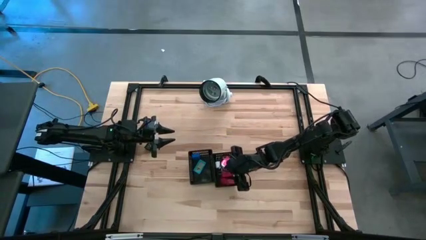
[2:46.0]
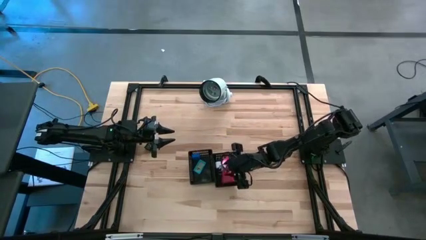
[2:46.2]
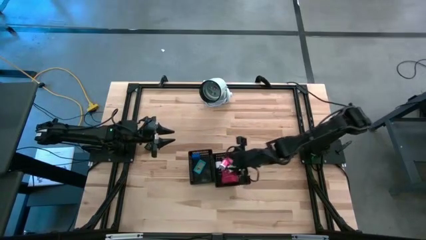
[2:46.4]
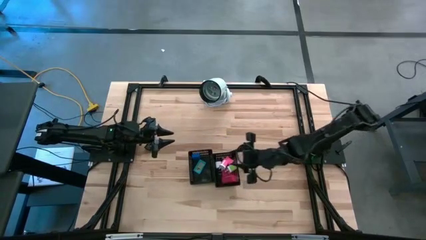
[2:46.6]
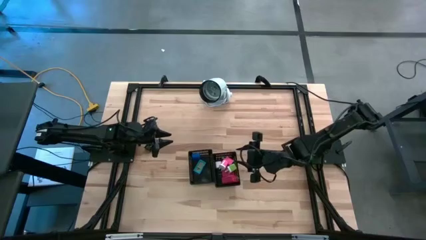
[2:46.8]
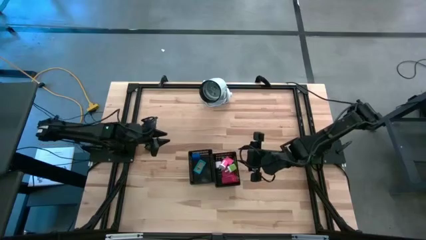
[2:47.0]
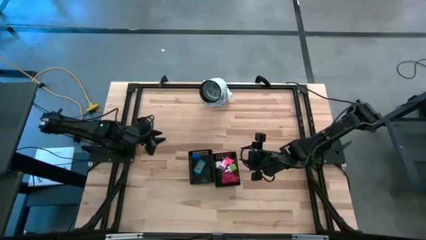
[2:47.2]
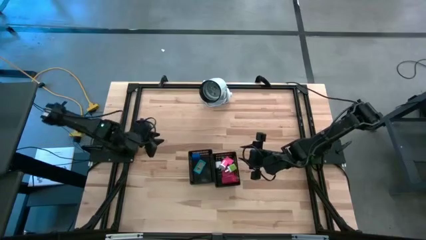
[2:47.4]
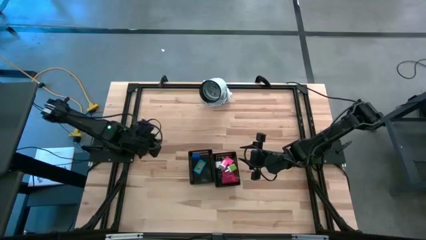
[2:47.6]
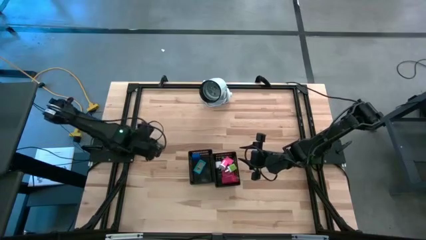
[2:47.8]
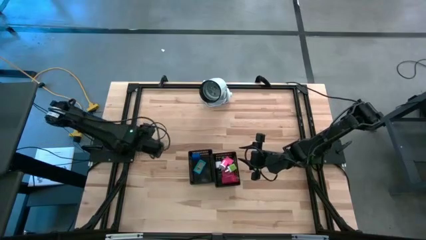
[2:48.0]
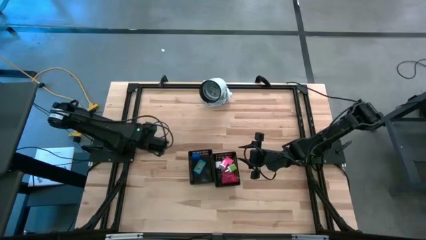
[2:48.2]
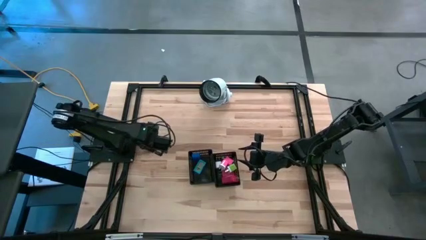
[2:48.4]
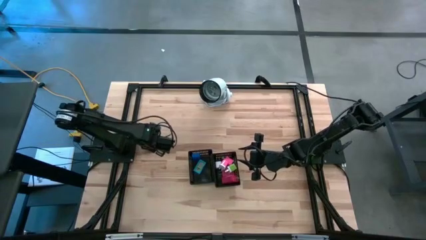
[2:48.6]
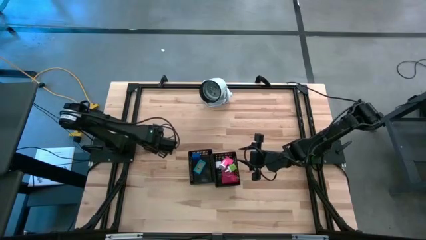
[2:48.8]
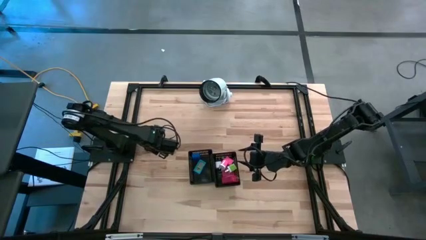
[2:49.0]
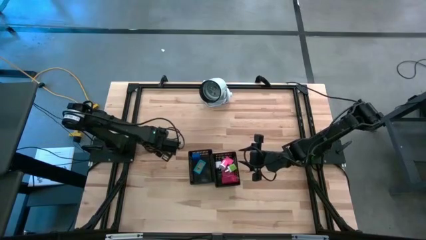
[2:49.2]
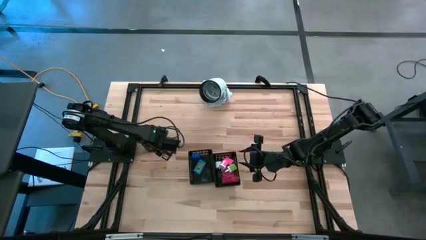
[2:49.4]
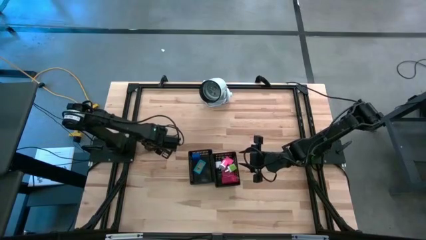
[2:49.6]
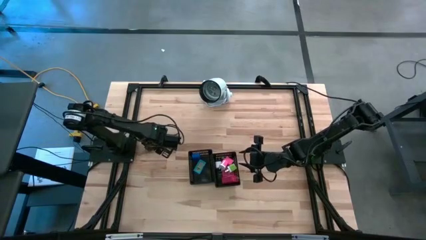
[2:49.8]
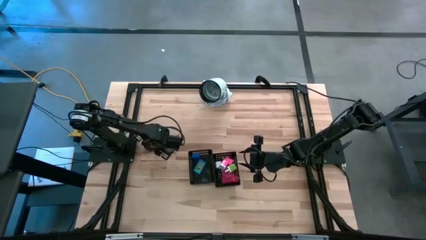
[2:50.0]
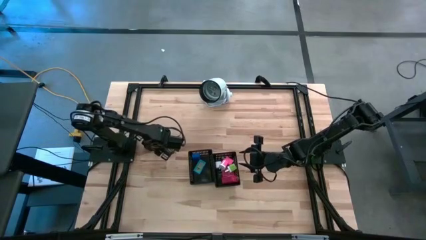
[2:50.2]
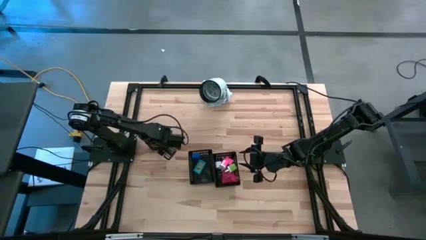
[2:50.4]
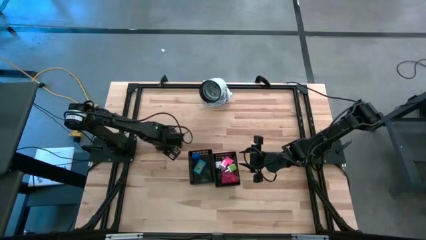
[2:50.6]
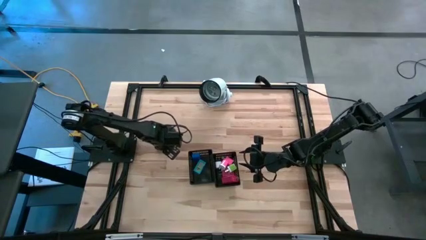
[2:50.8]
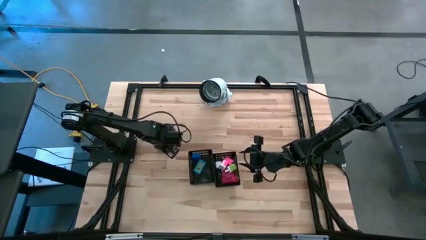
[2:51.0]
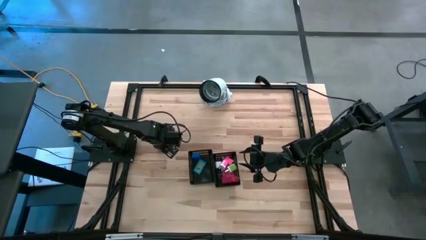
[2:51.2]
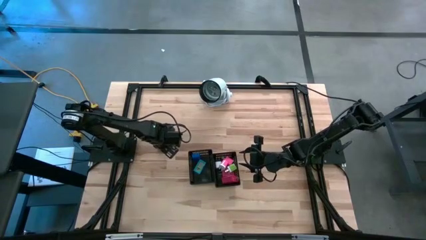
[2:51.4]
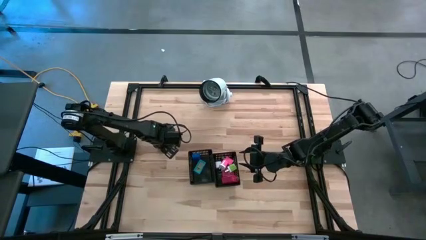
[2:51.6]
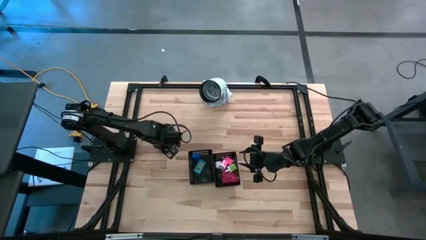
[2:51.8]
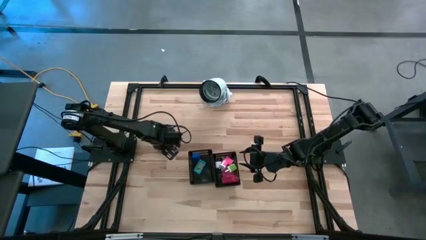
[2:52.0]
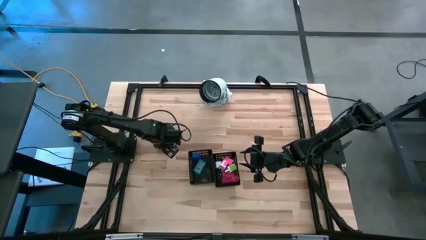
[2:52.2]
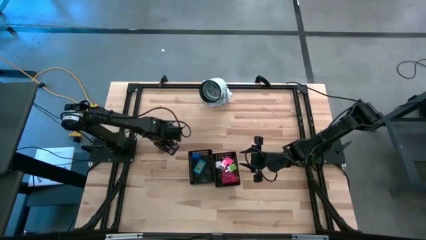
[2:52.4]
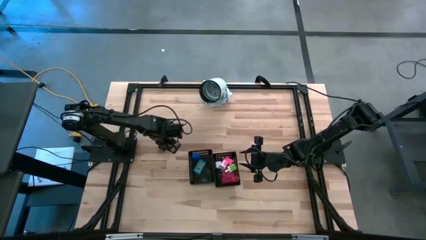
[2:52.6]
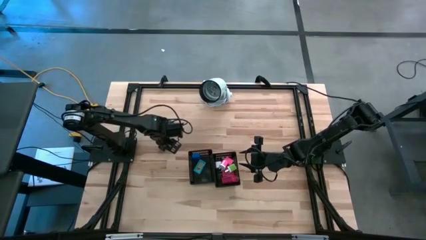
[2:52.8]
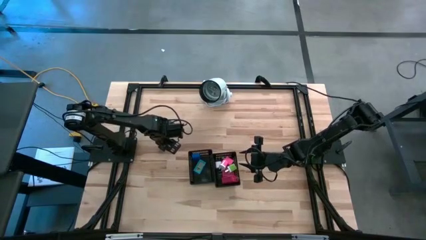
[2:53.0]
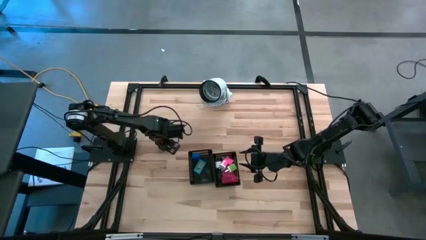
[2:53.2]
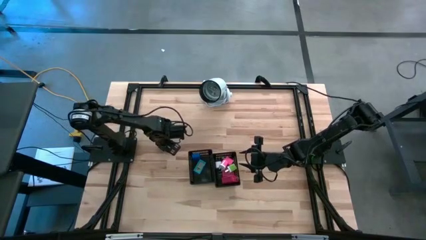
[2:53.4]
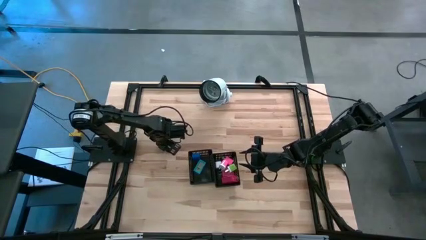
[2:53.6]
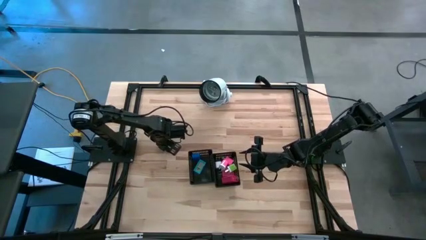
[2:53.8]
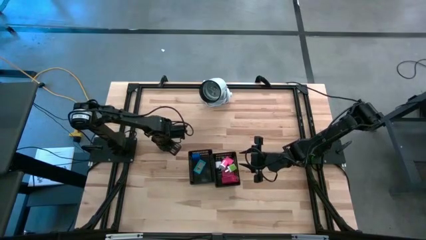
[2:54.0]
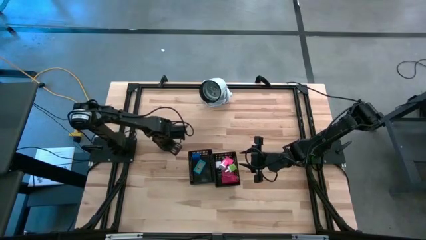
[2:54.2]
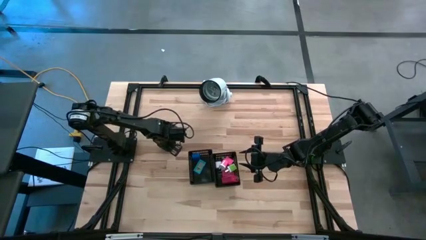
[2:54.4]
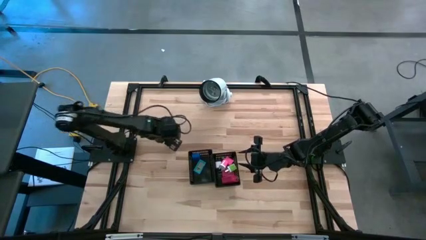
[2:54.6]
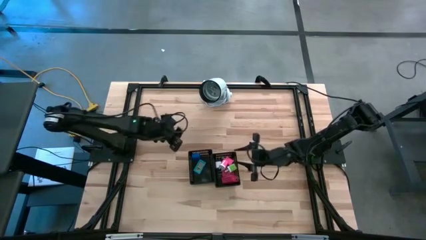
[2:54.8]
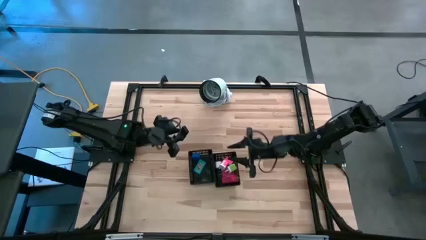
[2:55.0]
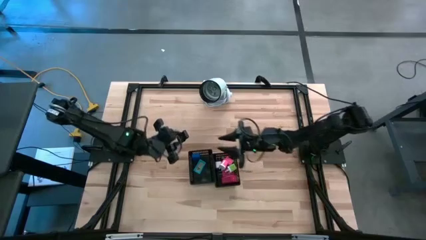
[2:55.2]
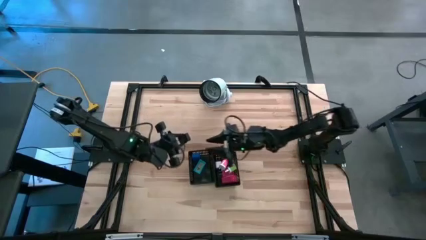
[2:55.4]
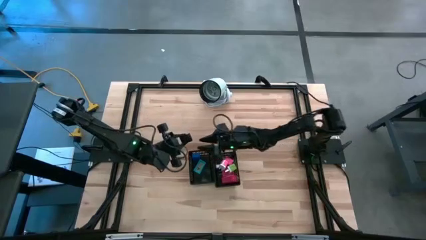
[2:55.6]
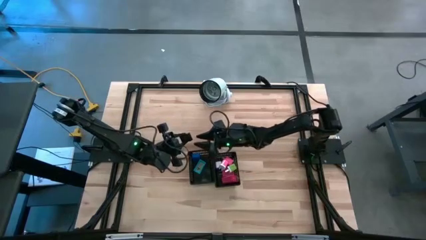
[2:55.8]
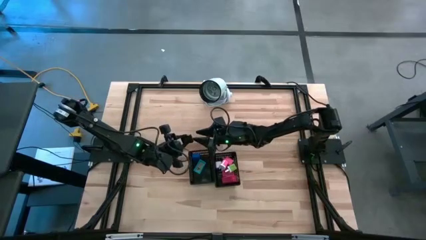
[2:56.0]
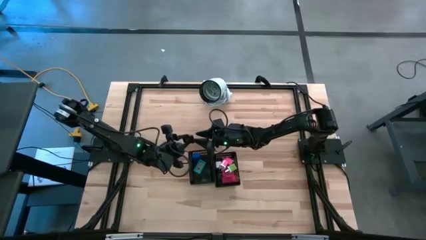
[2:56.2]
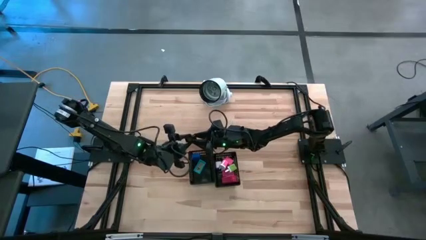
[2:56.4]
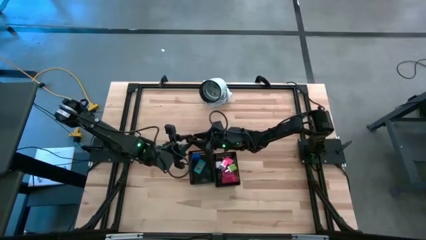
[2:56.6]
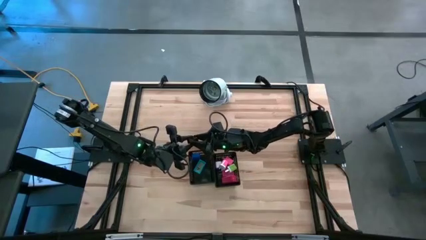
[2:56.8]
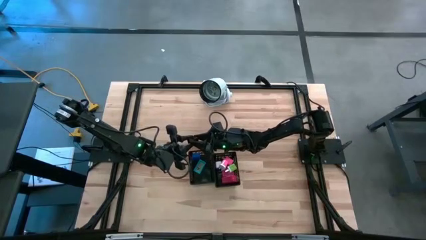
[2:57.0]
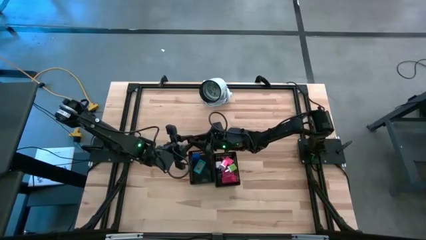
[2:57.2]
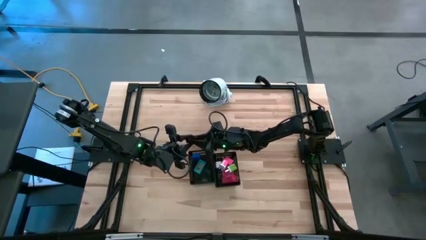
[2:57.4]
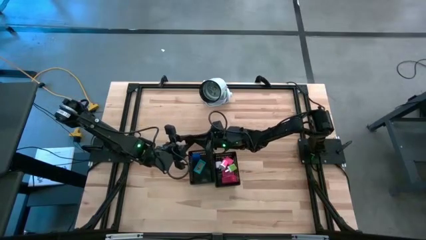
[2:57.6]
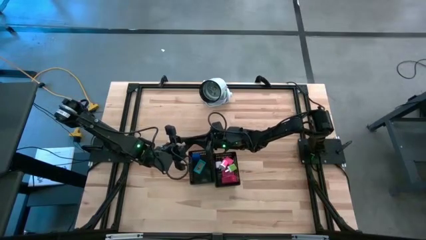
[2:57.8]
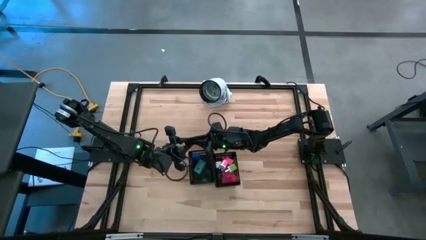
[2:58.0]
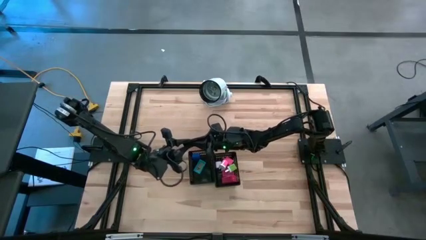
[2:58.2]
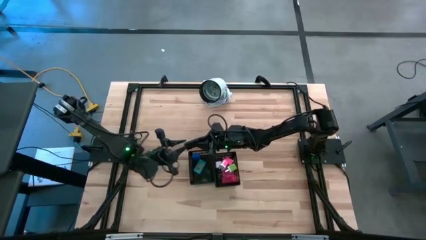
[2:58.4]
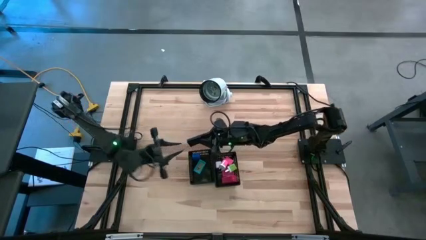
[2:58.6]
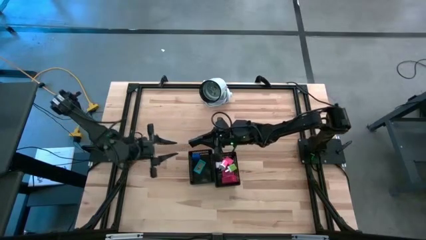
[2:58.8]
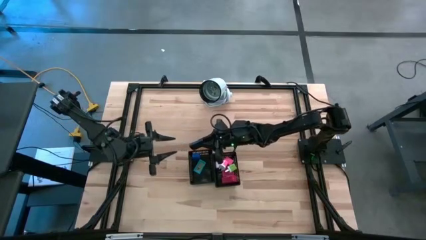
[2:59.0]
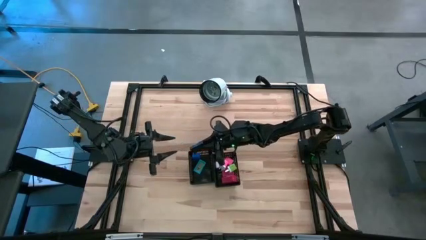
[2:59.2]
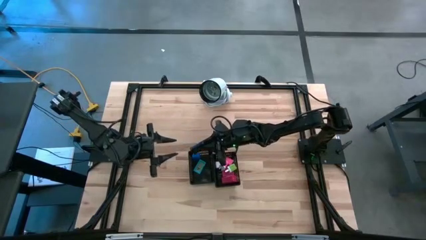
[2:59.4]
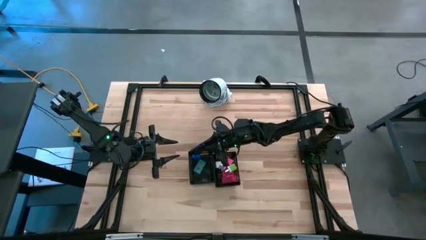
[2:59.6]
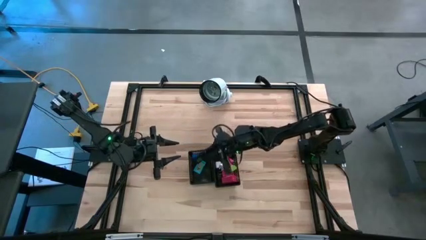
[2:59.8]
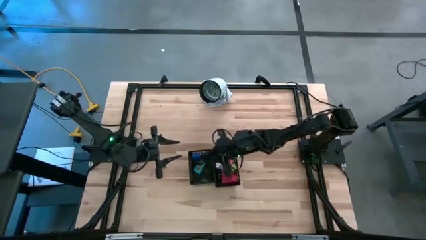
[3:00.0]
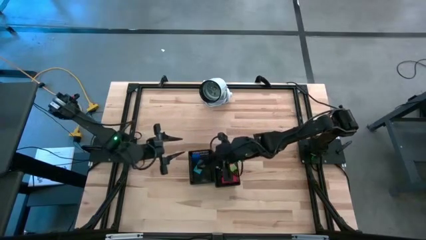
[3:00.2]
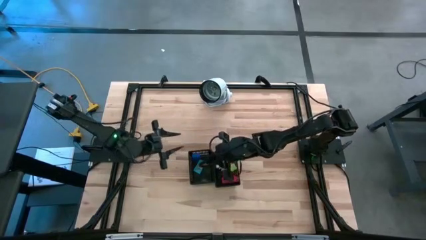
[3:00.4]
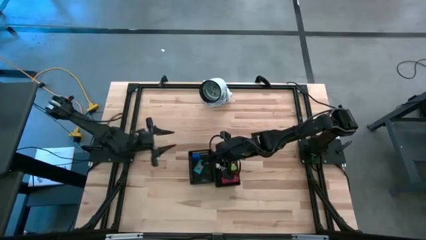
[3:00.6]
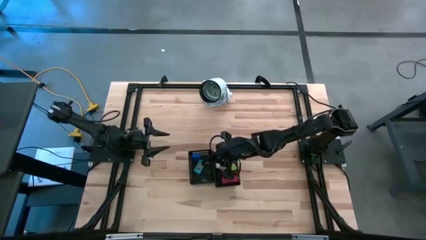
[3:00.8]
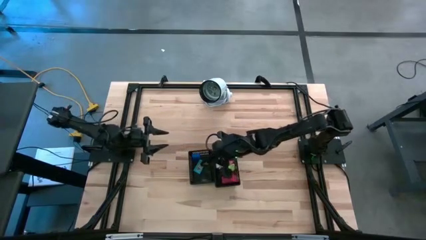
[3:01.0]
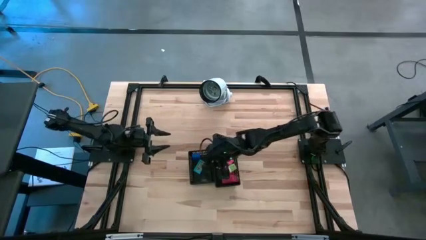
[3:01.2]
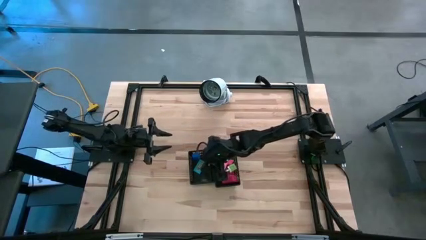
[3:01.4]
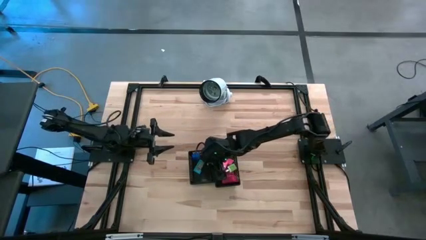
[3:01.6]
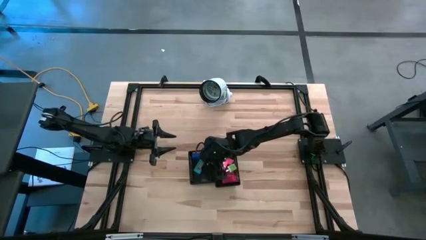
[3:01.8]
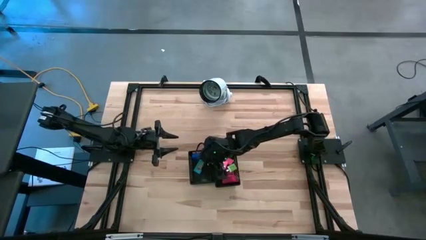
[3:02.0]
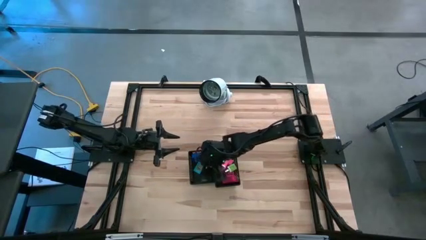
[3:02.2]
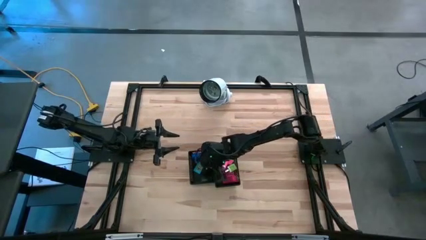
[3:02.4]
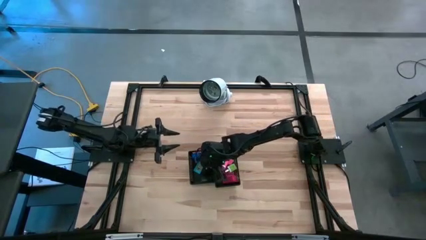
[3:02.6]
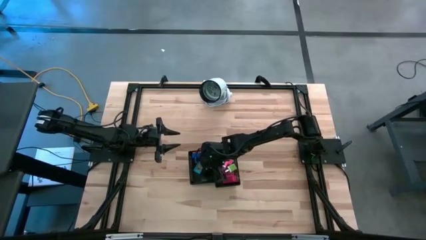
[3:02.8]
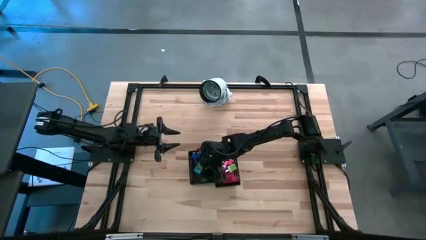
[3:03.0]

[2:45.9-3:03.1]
Task: Pick & Place Office items
Put the black digital clock into the left black bin
